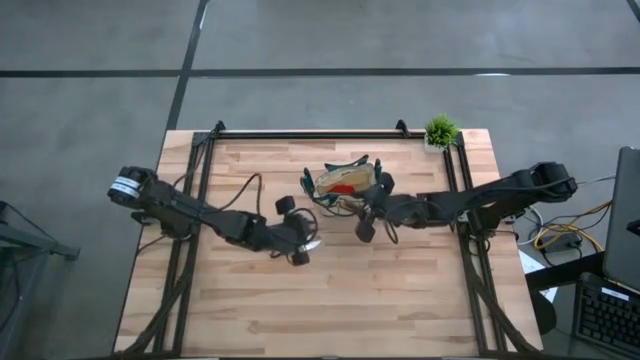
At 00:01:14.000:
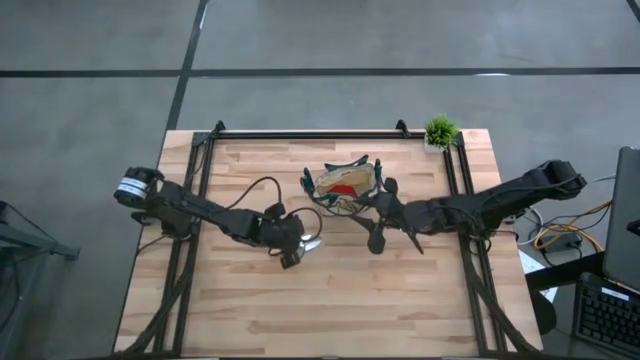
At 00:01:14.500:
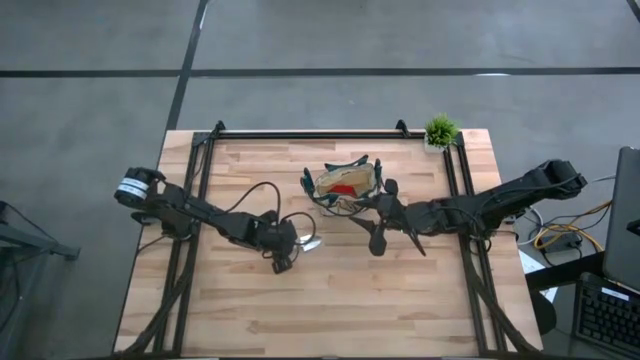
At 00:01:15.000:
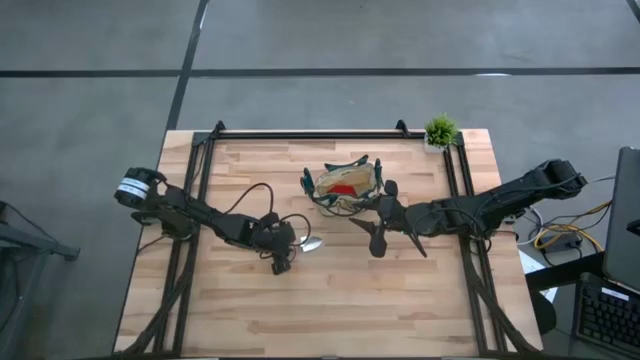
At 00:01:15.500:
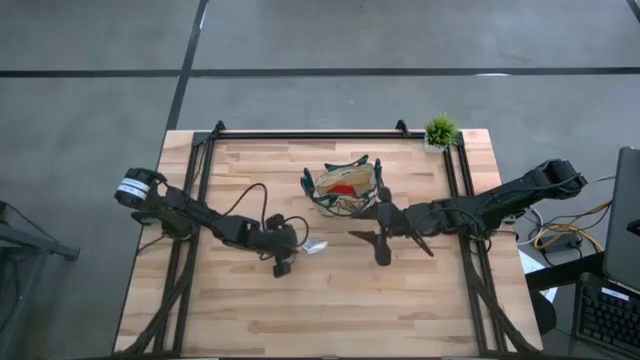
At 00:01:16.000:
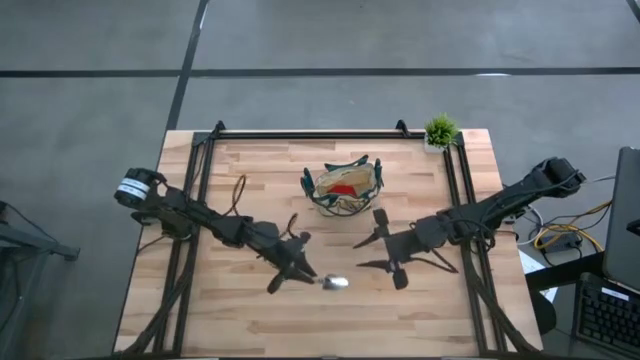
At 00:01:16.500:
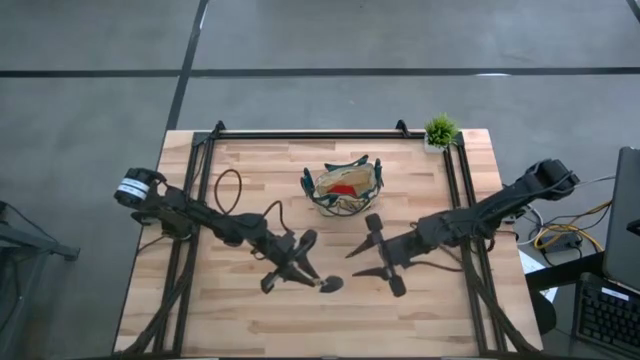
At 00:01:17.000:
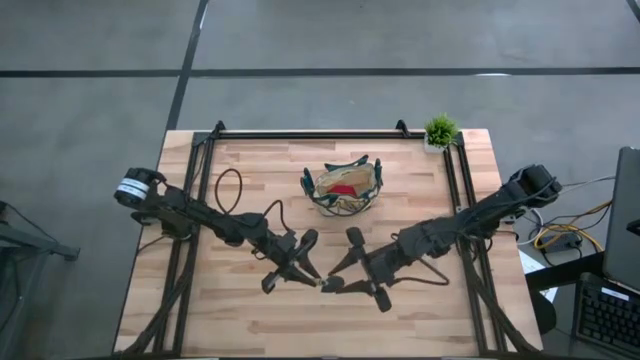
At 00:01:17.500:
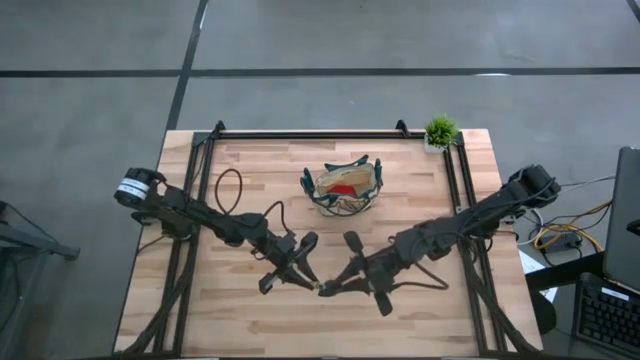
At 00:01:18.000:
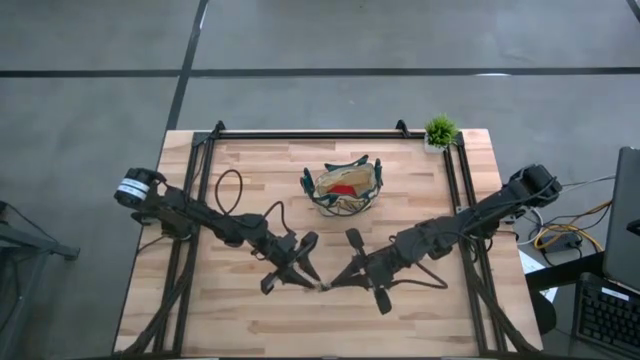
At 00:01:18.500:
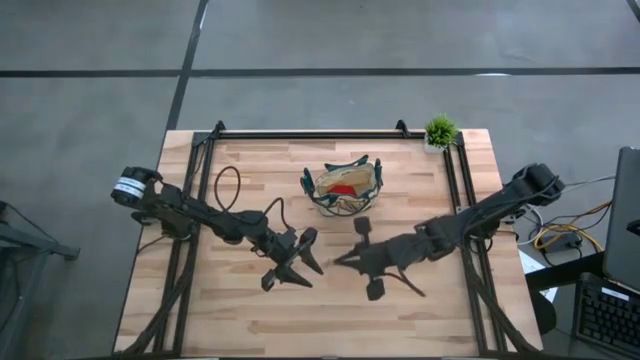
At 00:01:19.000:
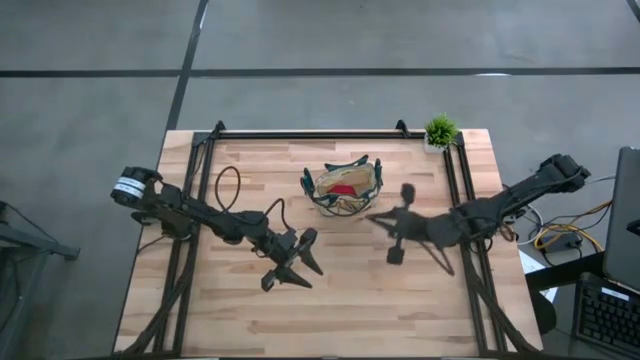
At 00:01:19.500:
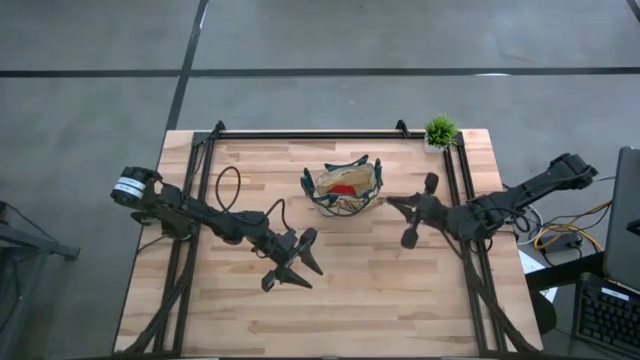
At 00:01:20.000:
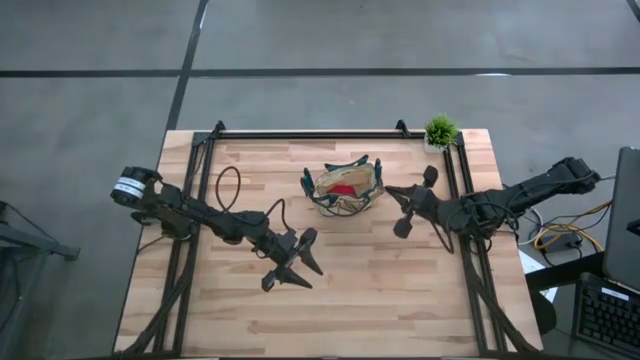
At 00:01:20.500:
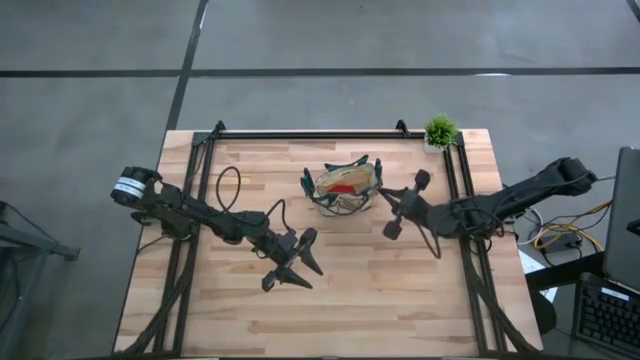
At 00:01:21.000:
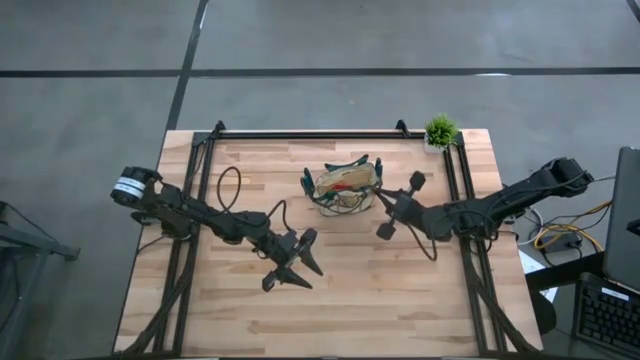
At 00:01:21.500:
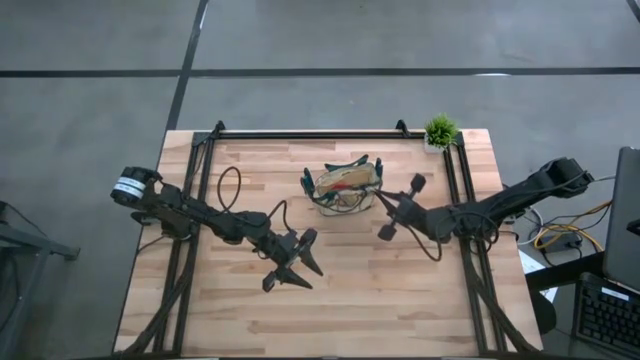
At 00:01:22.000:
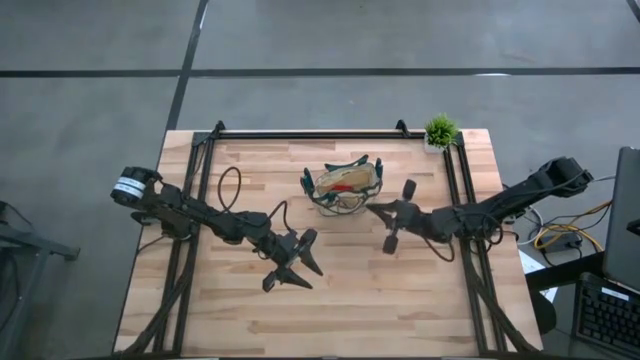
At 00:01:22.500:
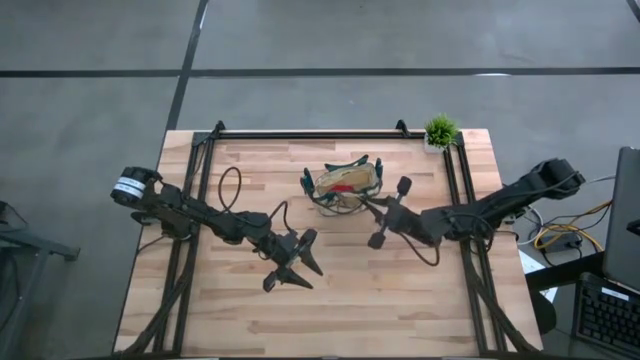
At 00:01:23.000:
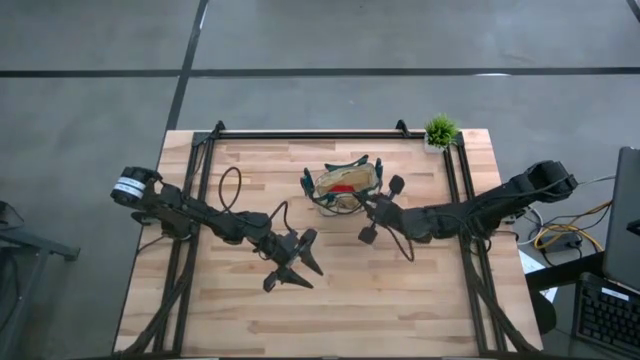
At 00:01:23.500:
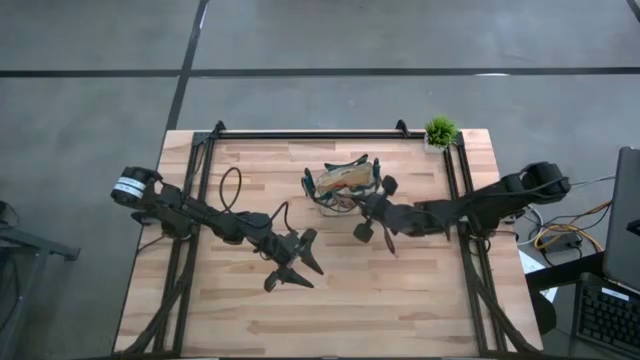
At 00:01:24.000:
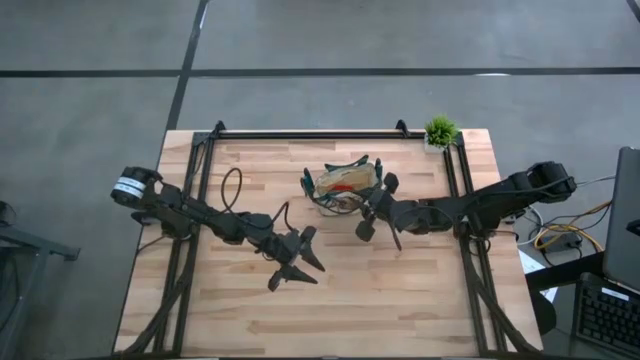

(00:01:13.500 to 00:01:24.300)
Task: Pick & Place Garden tools in Gardening bag
Put the brown trowel into the brown bag

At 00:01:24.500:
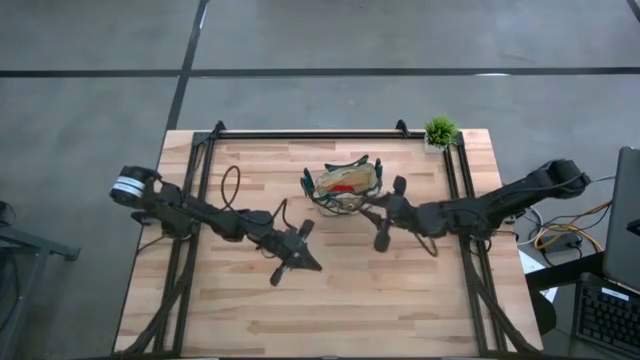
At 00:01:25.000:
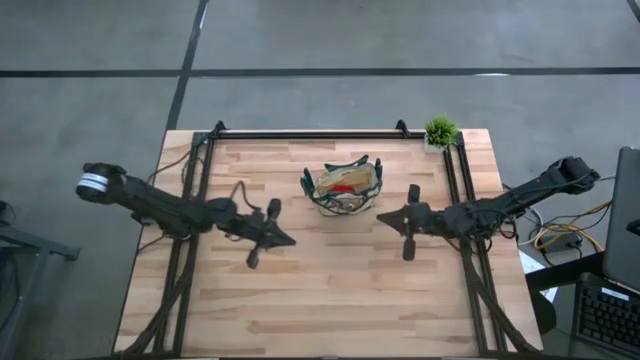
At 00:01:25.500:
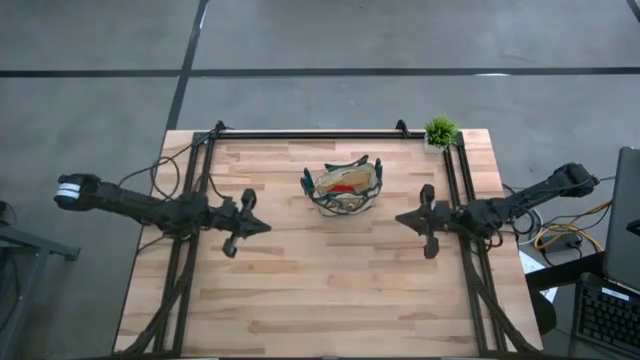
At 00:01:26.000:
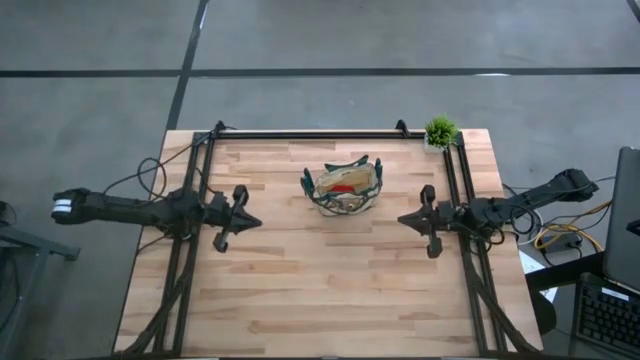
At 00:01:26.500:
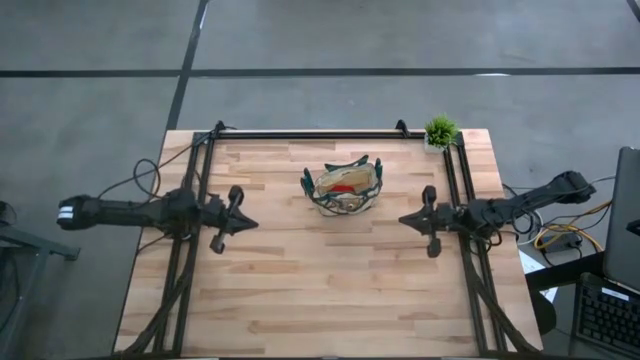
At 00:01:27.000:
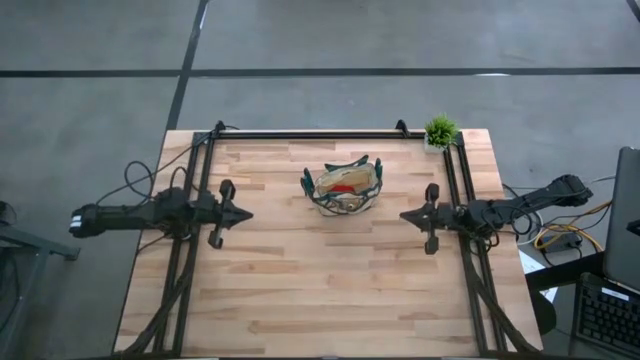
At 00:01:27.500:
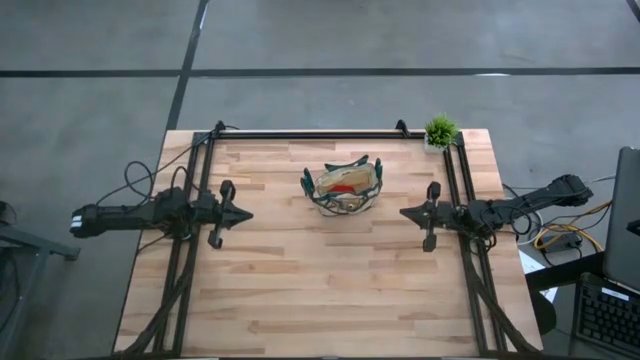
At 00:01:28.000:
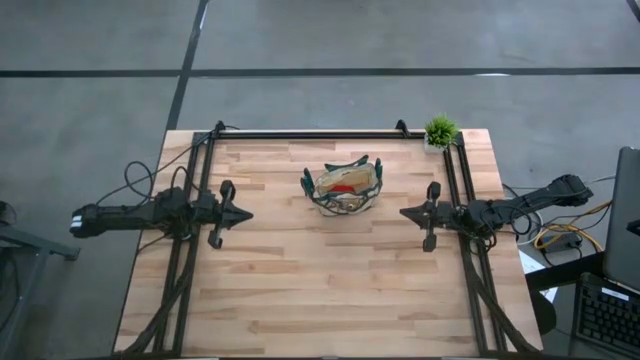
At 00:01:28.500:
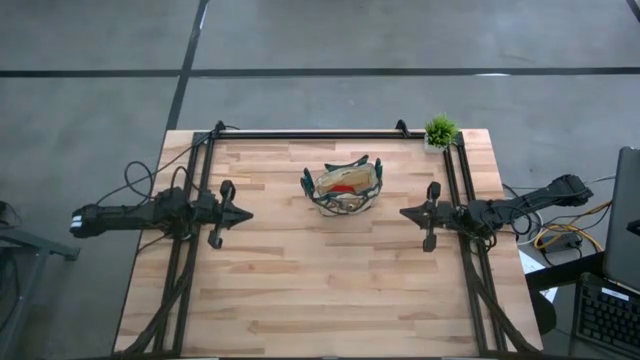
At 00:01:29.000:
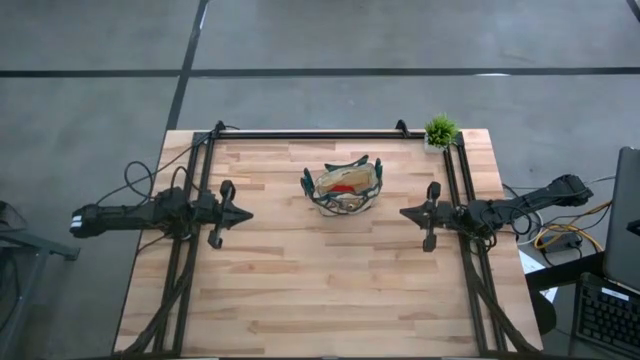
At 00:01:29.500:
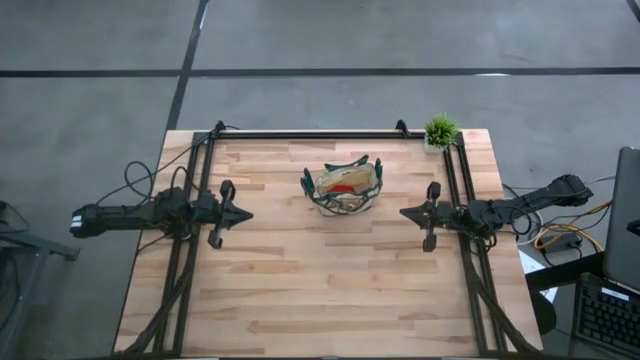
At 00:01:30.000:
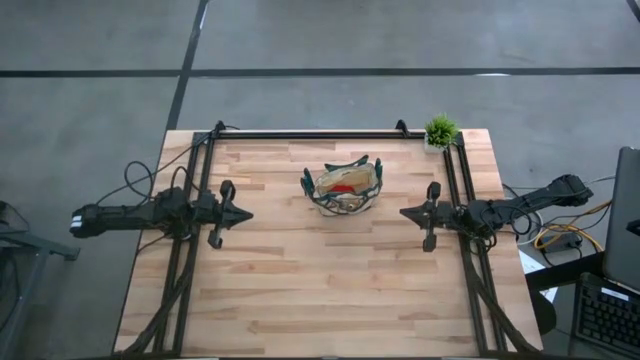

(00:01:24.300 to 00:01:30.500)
Return to Home Position
